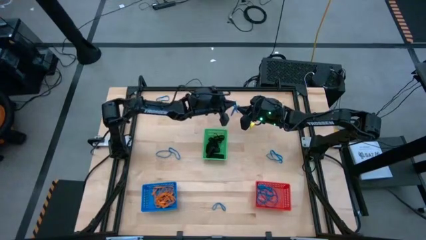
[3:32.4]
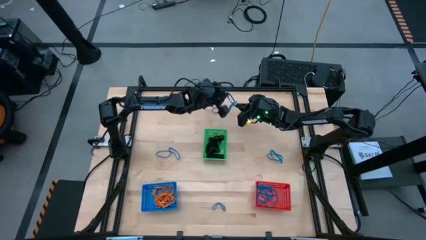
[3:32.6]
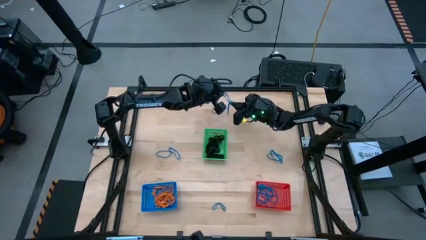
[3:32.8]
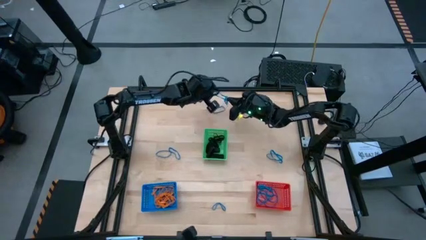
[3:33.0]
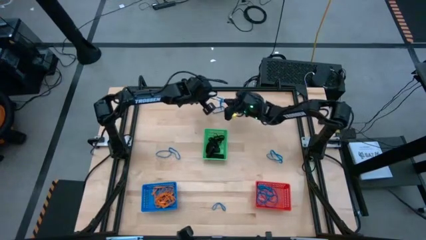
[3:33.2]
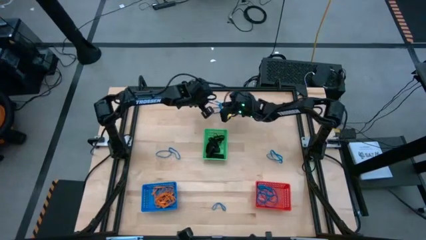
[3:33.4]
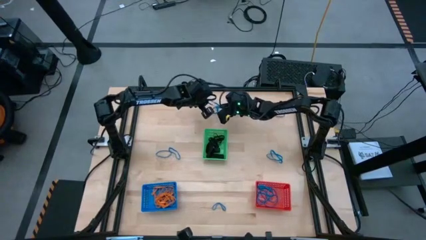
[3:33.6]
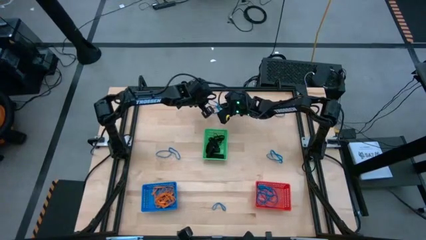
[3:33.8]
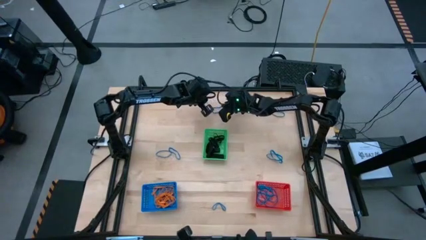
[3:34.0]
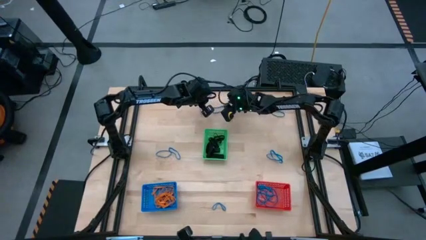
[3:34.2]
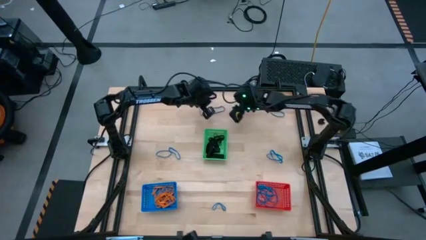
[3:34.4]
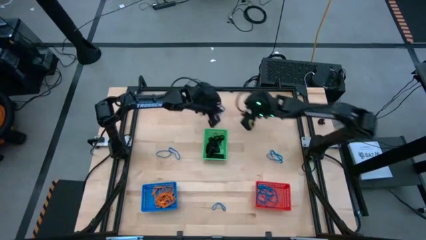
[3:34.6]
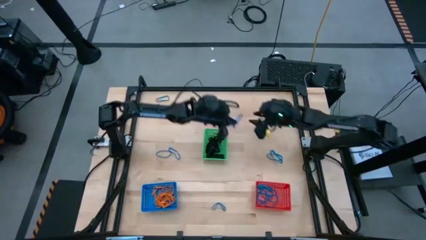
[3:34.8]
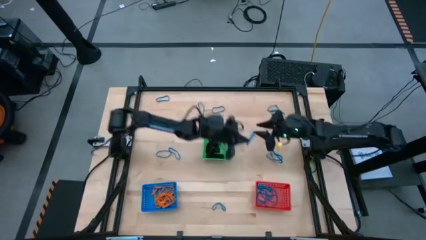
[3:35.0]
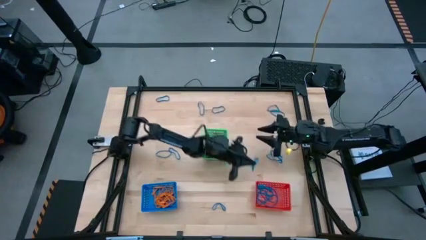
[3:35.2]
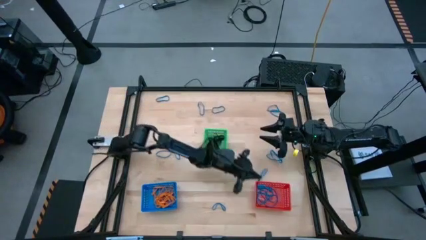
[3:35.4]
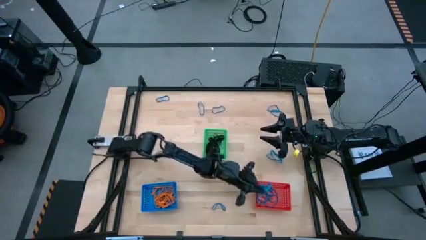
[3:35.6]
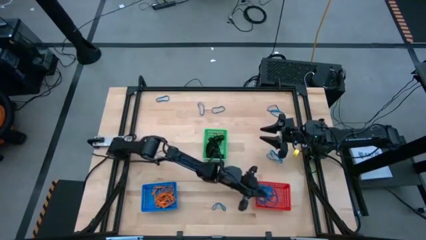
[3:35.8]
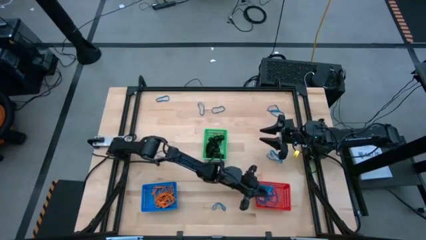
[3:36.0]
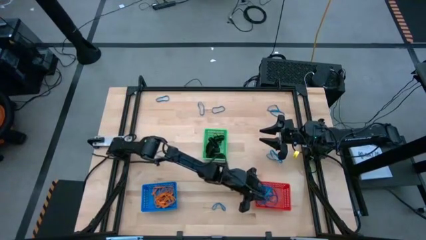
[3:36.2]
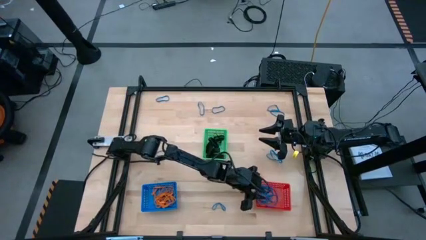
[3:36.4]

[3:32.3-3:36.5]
Task: Sort rubber bands into baskets
Put the blue rubber band into the red bin

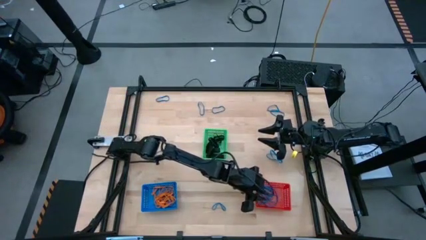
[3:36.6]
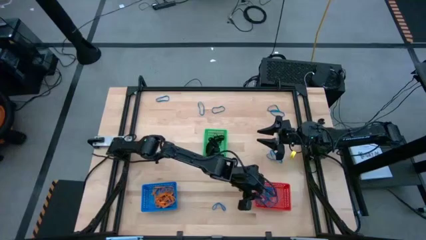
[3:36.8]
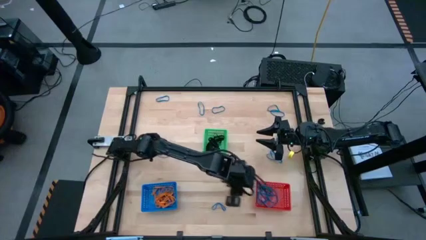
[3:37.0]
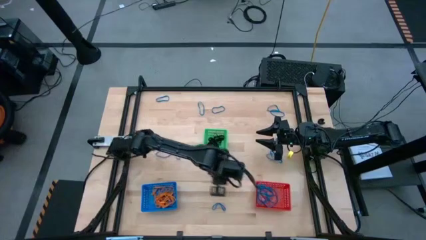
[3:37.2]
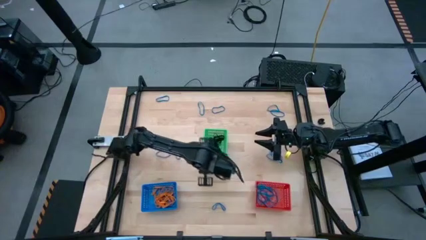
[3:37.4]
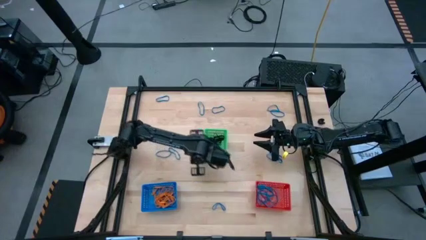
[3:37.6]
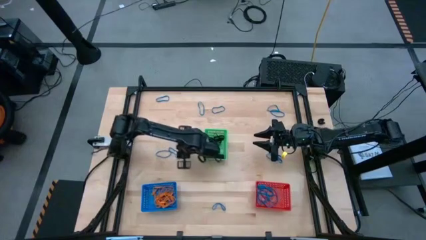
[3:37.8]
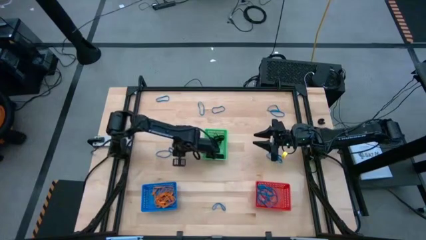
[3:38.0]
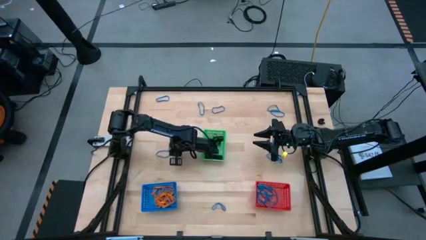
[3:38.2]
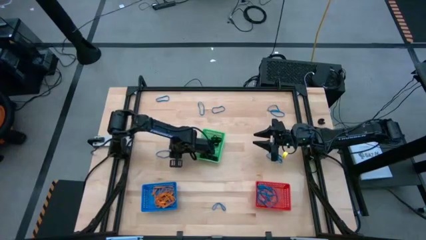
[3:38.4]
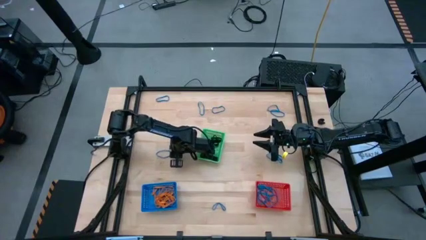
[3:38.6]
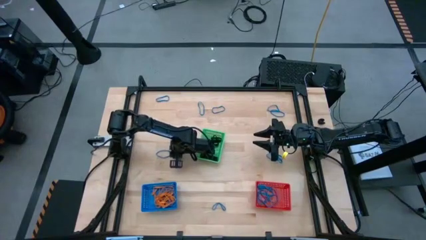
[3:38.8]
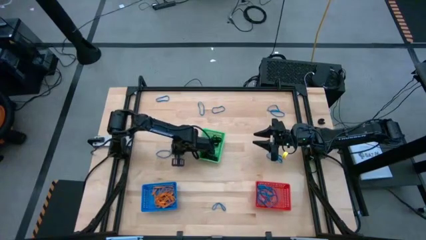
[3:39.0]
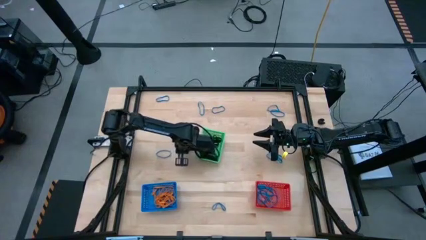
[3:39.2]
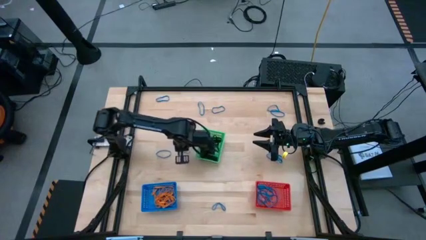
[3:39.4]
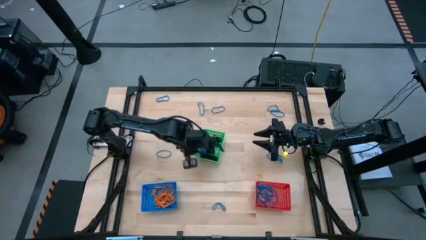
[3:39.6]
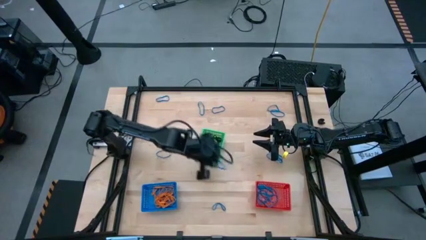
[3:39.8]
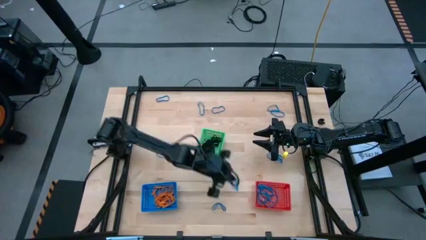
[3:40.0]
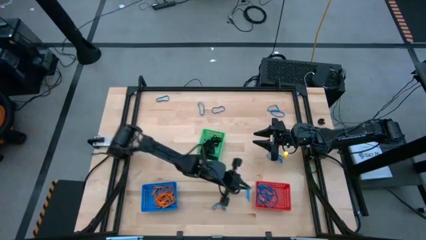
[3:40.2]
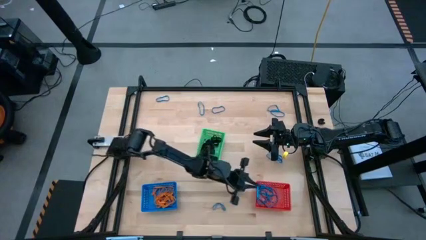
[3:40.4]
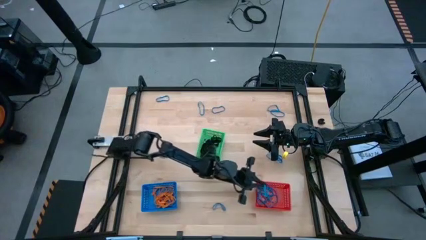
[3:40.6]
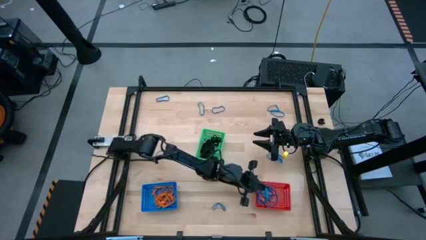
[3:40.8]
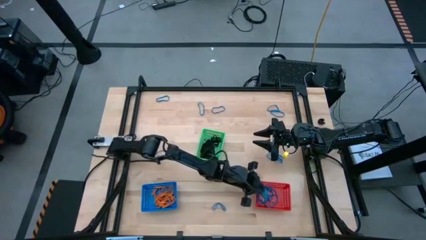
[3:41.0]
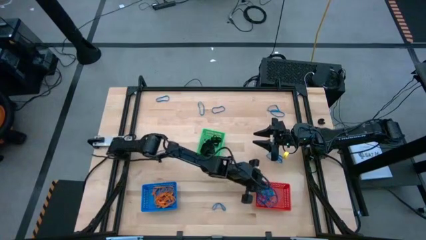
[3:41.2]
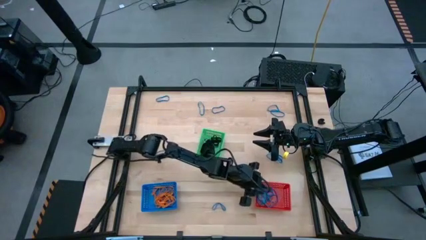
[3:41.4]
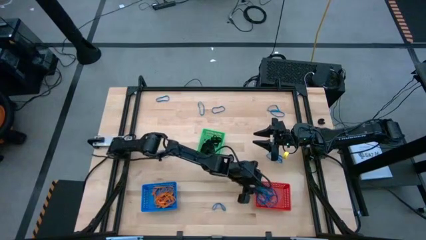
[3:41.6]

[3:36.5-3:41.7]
Put the blue rubber band into the red bin

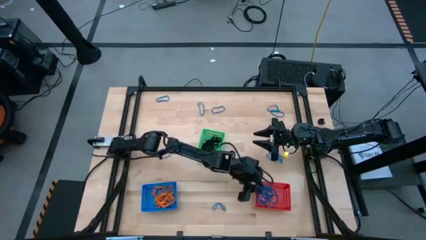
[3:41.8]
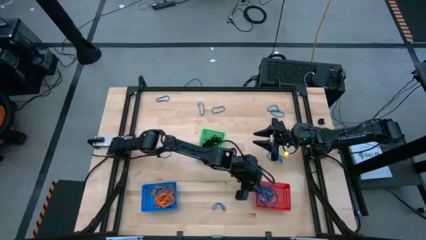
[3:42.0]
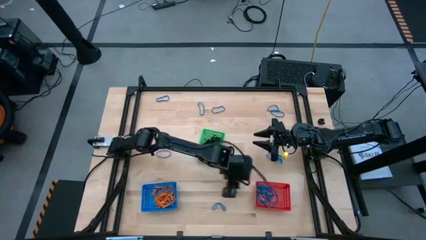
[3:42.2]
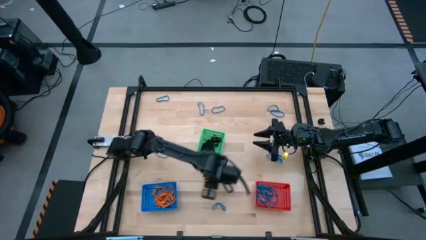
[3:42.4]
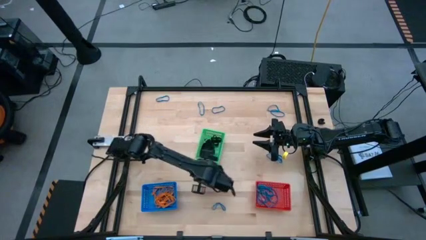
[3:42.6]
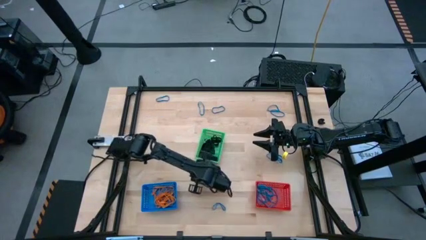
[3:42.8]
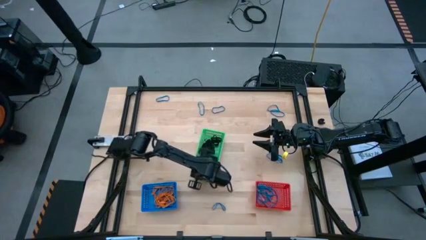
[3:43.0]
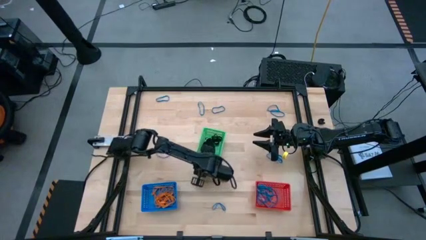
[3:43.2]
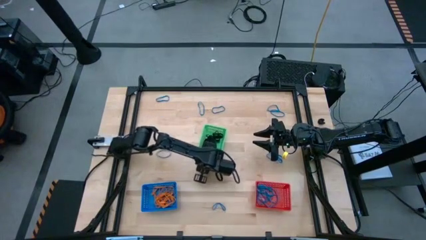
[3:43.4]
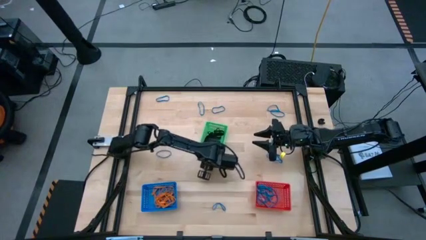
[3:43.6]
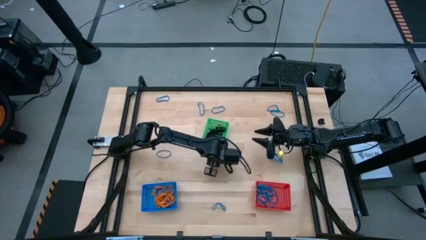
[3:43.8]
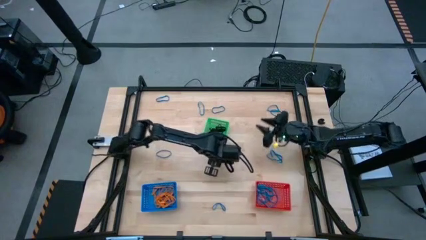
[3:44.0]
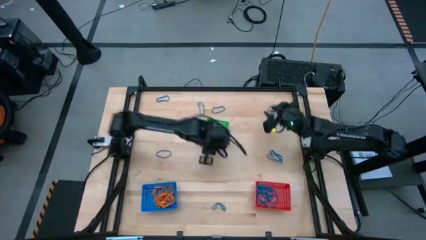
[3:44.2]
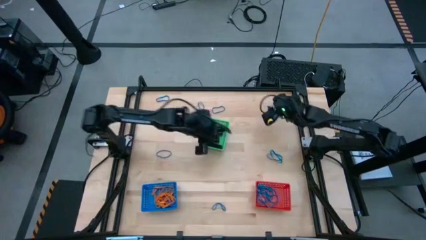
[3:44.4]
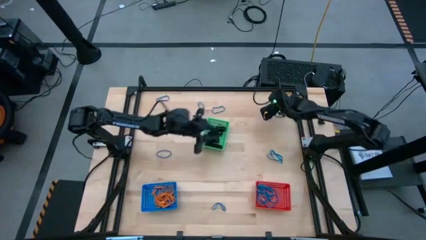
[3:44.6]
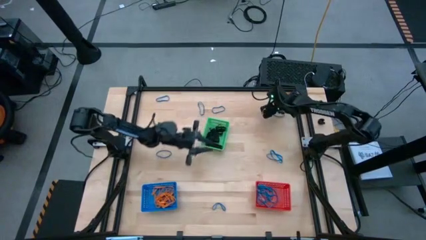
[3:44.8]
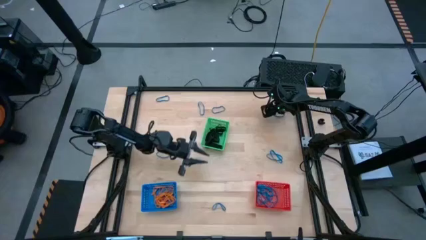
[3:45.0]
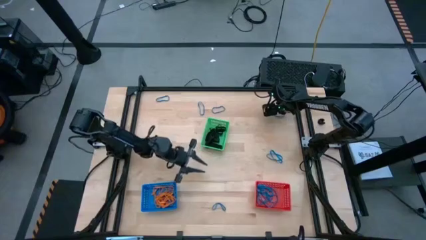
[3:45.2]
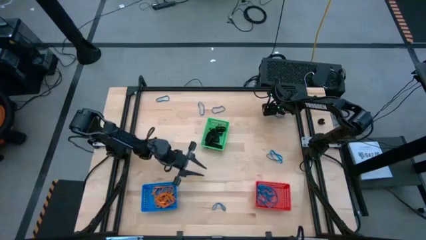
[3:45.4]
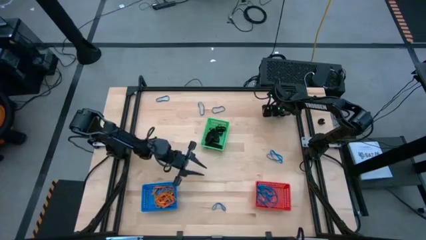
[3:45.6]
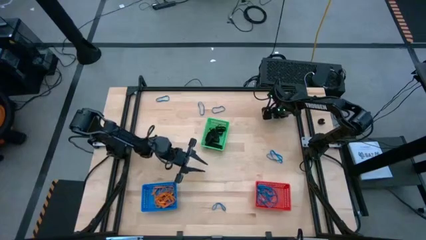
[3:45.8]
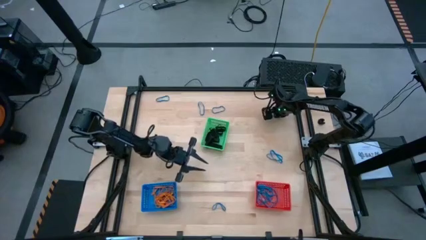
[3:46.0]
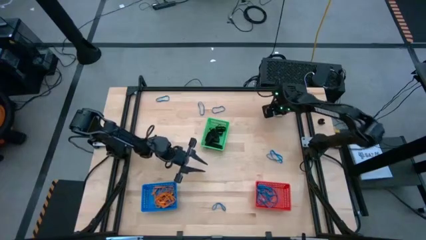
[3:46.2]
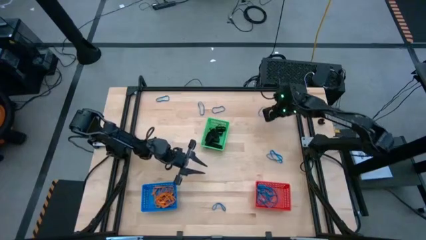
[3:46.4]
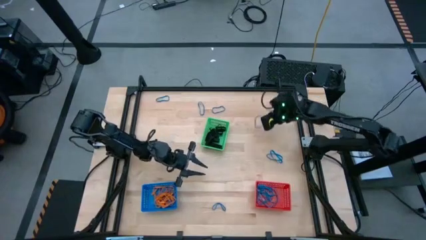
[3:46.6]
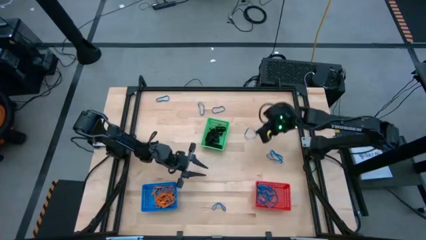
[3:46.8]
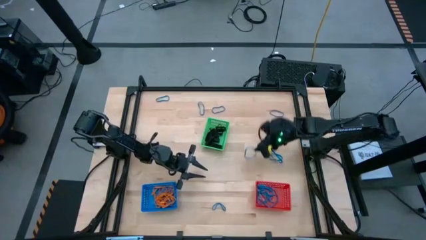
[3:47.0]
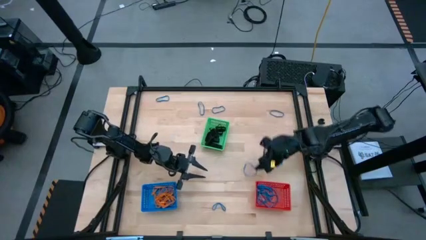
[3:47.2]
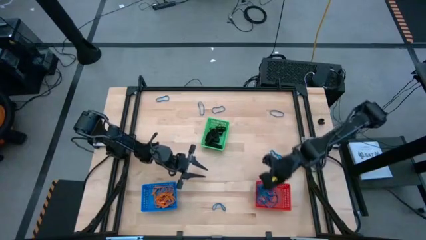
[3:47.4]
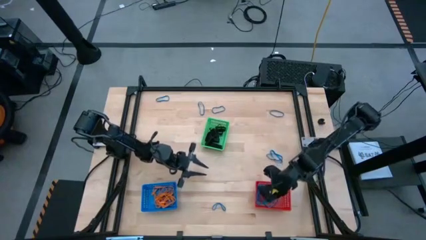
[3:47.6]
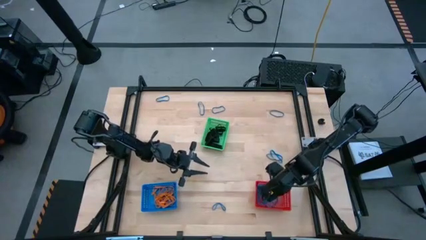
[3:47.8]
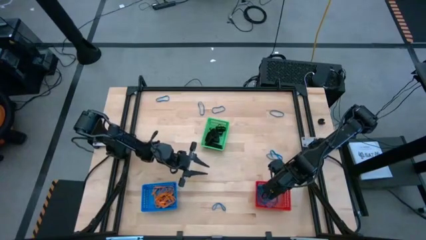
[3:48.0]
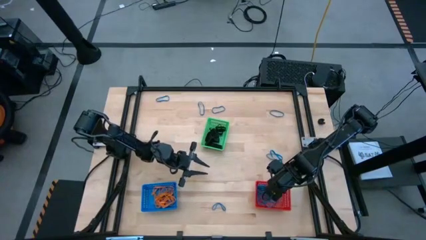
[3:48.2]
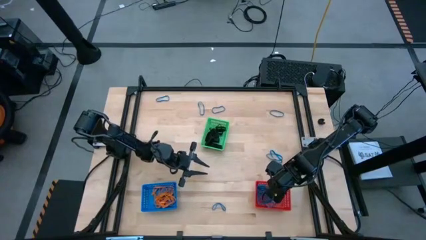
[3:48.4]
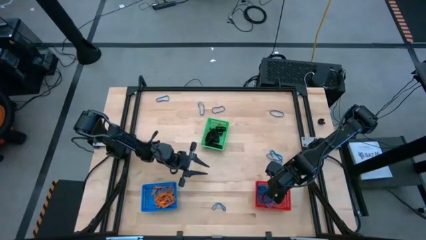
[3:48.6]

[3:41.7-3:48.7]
Put the blue rubber band into the red bin
